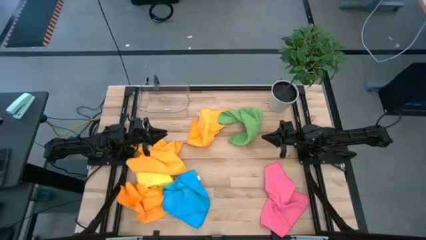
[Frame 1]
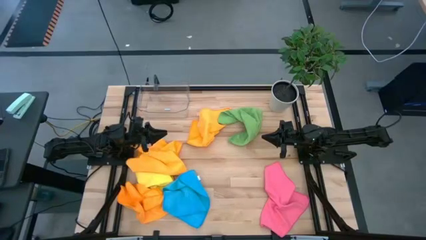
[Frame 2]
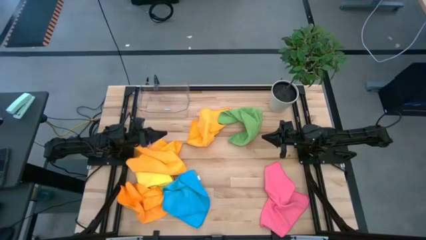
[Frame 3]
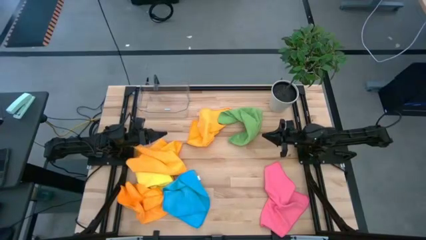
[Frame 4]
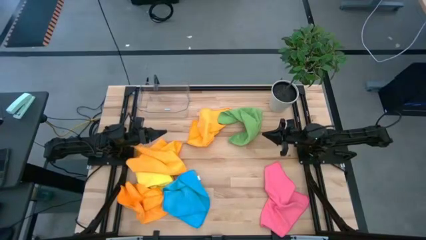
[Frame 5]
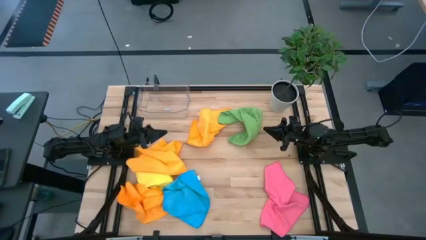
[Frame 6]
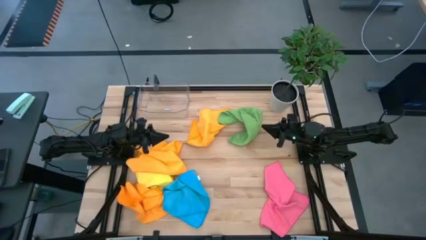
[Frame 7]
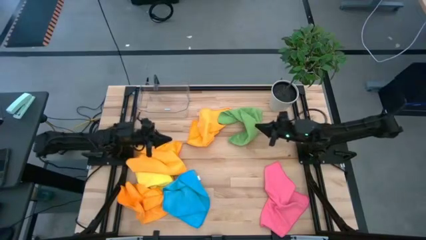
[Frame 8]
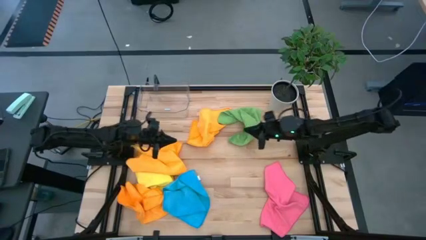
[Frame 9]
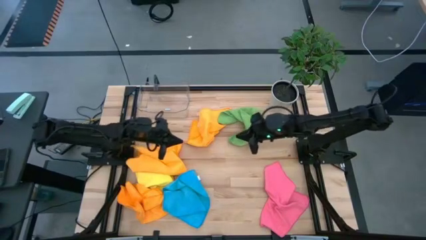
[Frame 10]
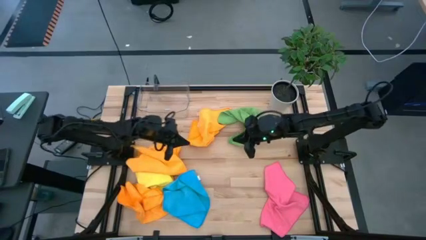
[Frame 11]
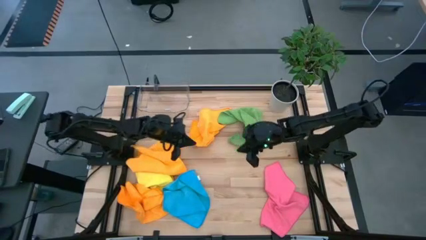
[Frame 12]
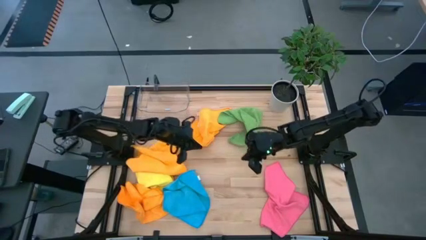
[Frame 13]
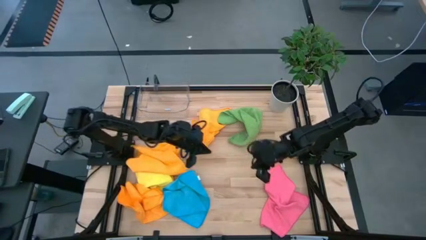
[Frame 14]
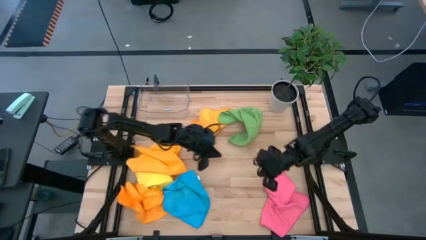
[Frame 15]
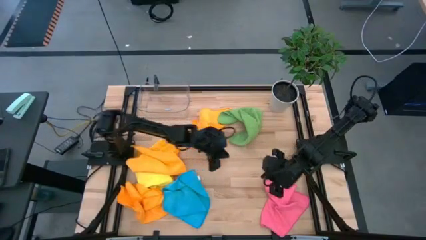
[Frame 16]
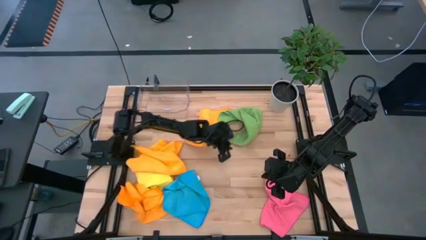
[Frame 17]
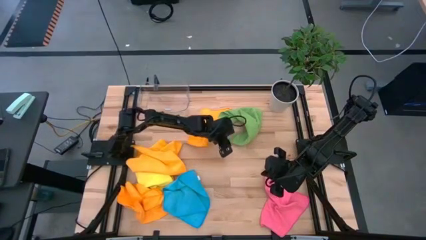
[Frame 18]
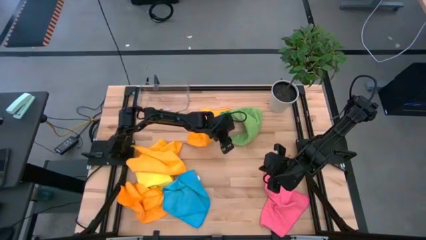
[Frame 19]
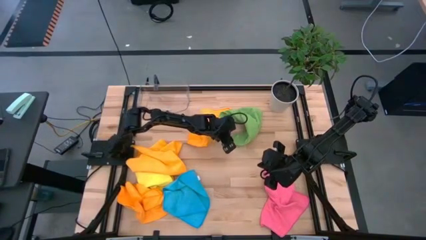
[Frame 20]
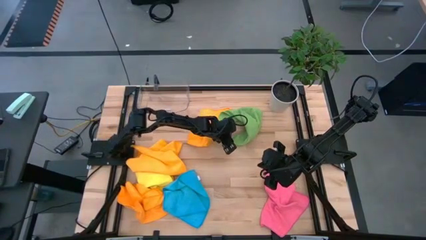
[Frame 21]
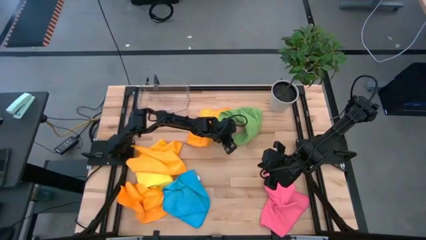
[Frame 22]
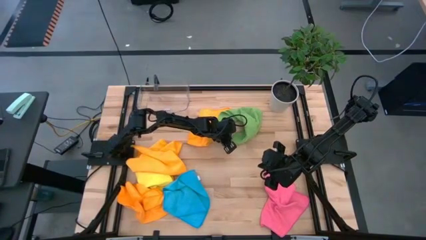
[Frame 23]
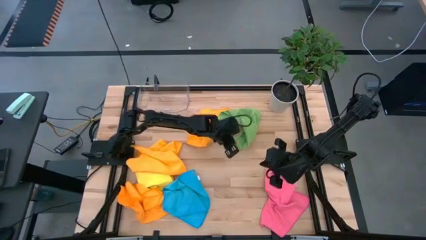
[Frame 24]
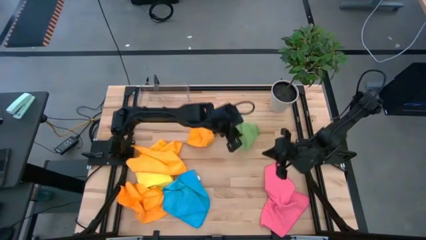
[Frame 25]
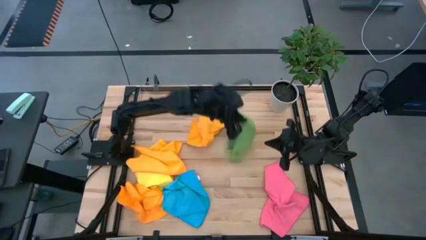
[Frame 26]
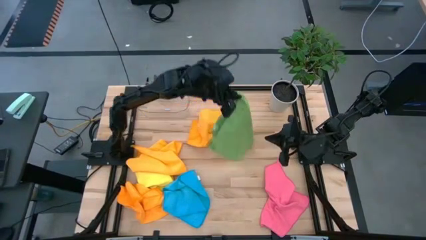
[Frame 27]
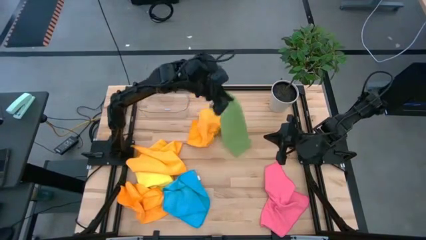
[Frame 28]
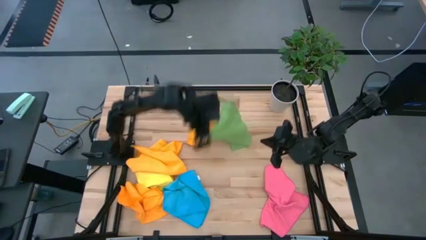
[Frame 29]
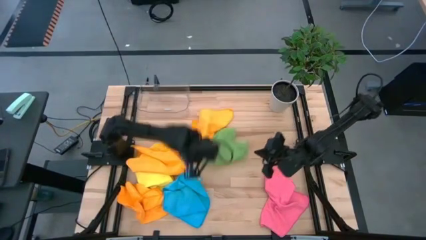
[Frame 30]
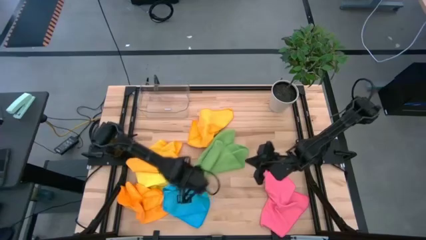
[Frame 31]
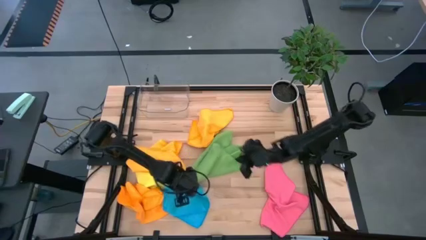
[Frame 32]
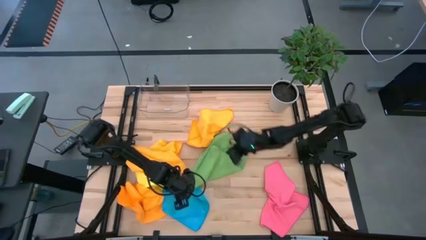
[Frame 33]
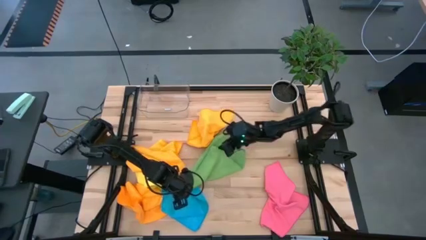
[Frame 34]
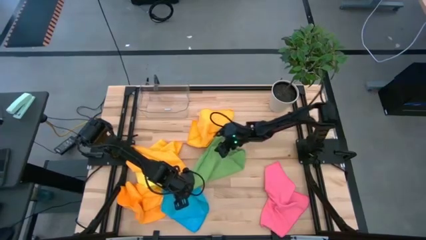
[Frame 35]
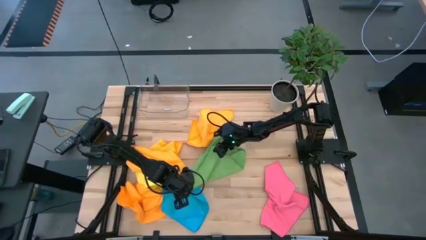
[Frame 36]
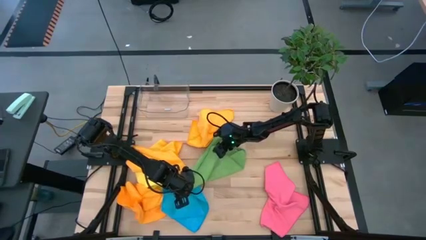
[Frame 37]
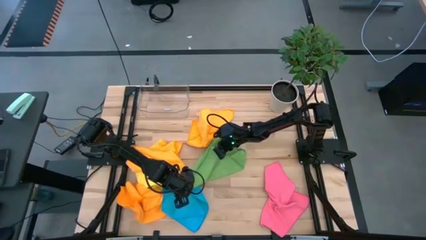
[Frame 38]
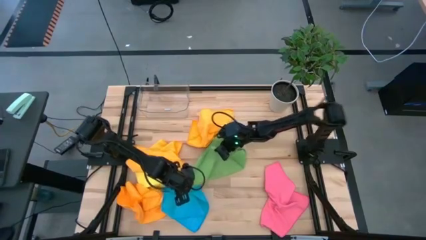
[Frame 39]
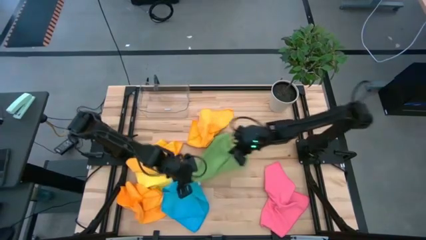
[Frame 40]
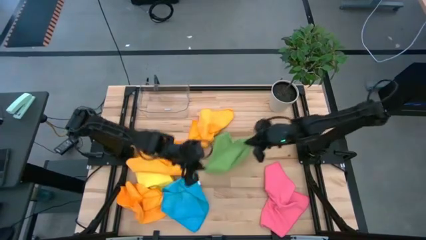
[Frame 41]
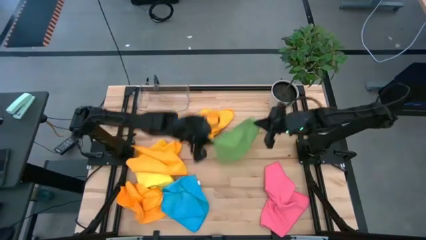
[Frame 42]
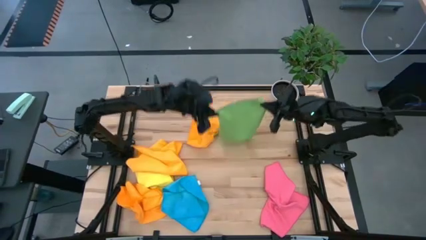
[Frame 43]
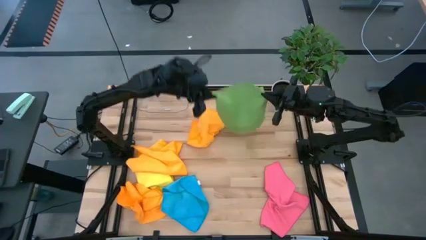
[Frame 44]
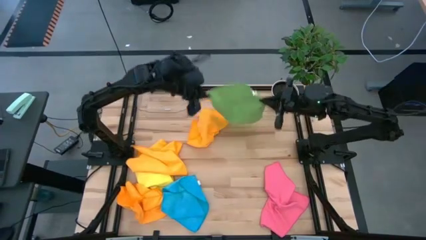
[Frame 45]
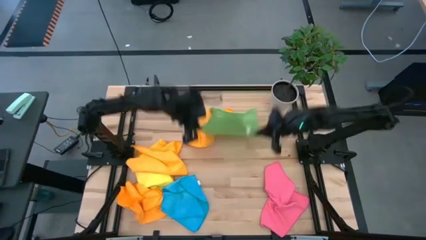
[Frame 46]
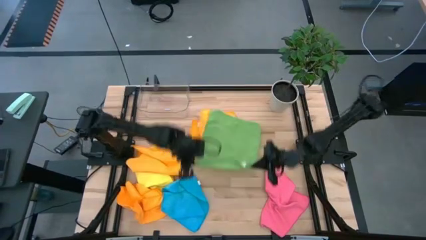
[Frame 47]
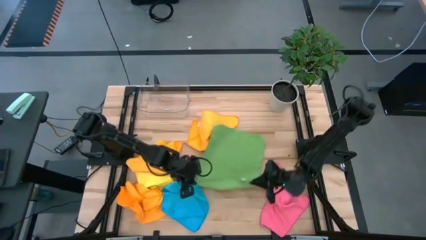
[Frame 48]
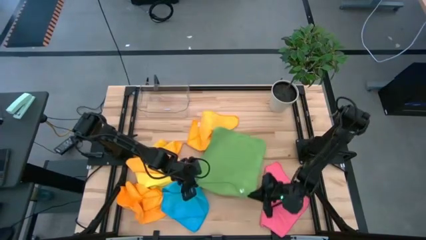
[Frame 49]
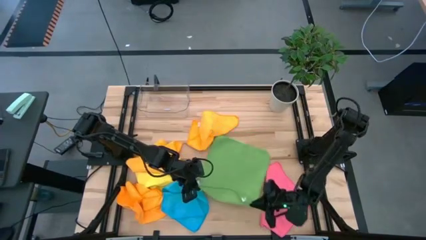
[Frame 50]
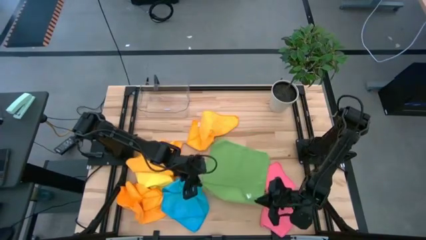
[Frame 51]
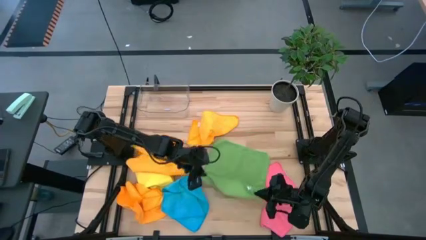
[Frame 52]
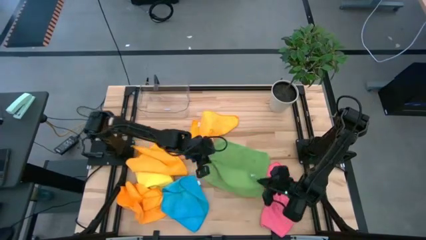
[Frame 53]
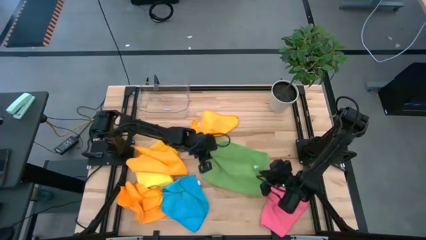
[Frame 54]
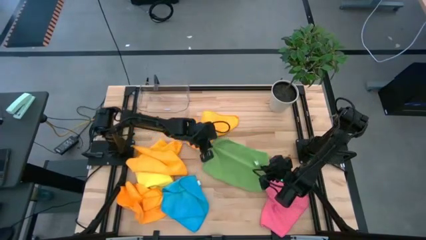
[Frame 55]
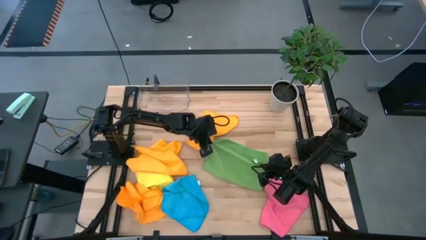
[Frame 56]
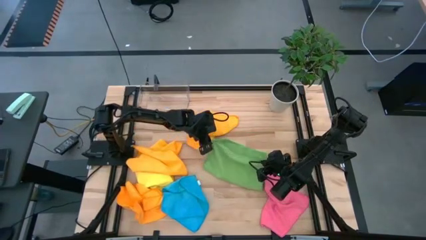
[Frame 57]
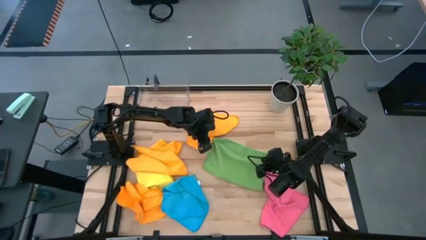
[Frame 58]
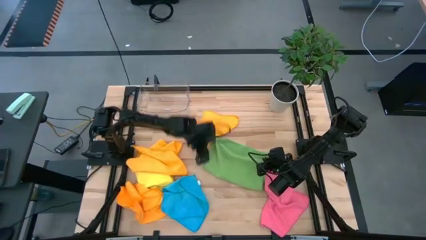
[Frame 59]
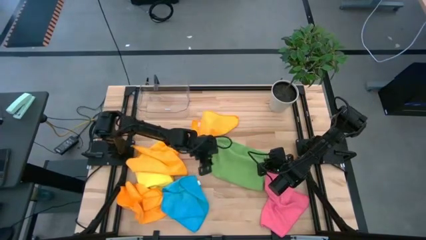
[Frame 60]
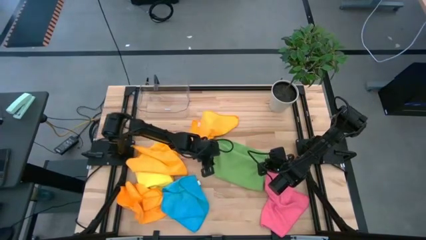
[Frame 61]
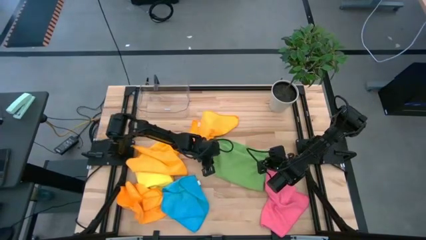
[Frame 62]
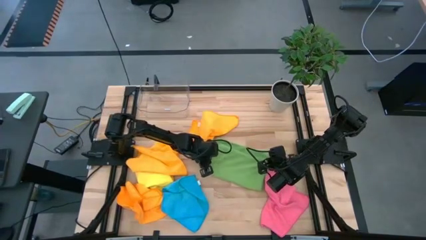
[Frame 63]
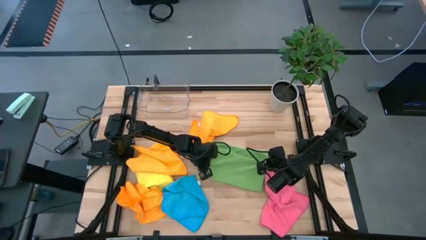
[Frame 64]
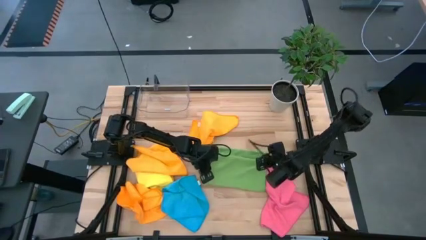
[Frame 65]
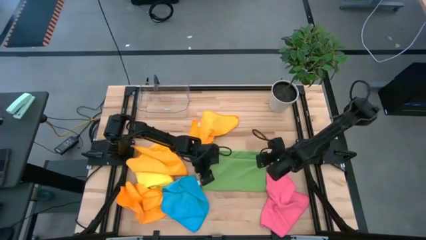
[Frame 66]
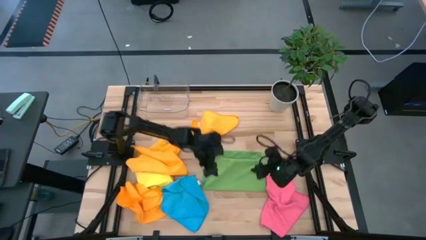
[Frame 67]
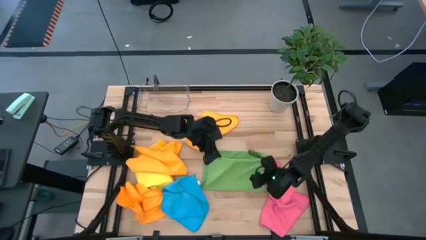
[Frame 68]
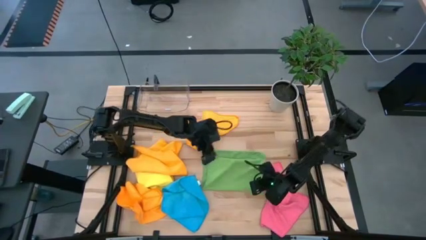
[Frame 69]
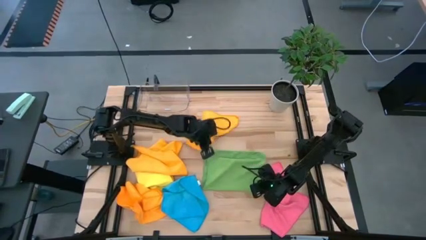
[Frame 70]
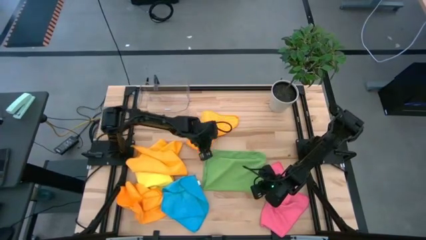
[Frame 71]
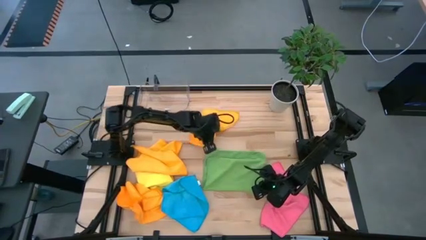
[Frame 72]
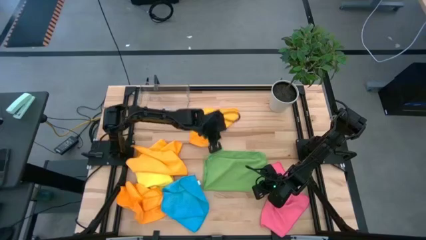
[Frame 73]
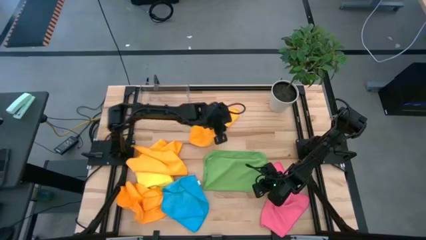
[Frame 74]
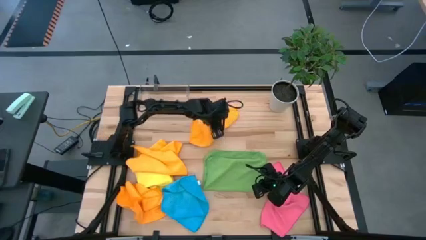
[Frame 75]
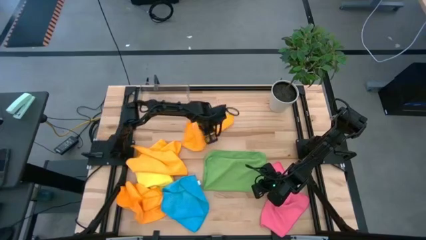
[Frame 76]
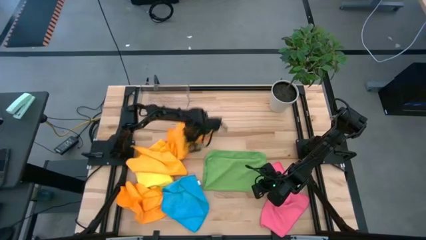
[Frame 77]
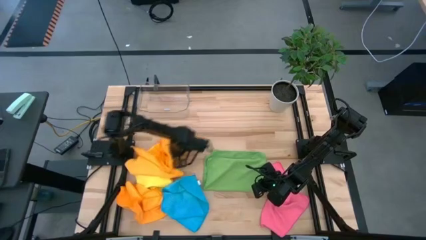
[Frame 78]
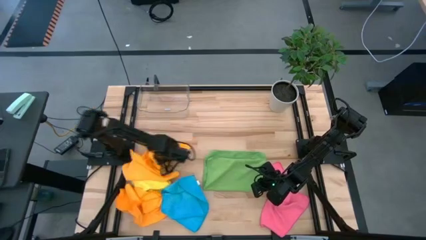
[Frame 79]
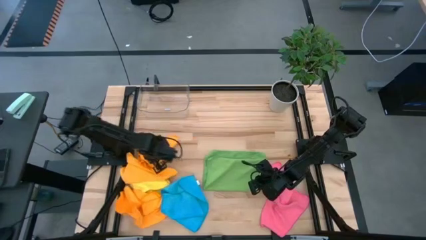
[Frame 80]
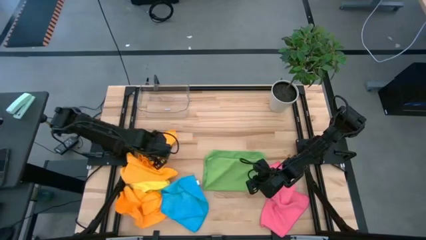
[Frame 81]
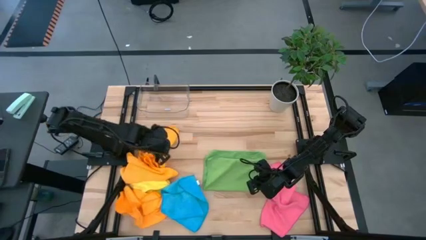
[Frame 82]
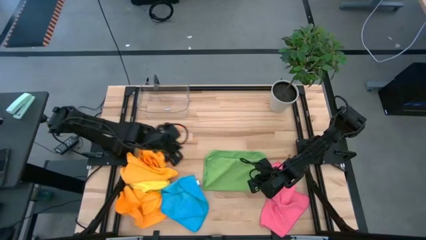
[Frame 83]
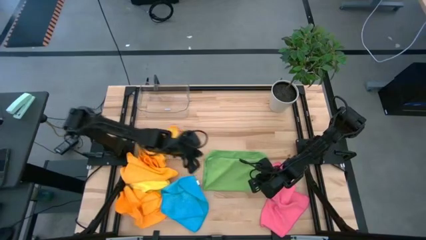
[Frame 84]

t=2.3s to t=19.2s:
Task: Fold microfiber towels
Fold the green towel
